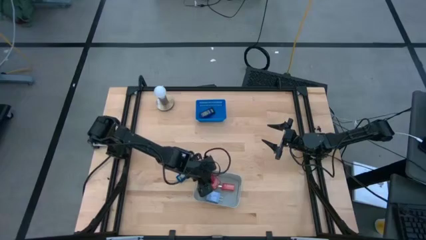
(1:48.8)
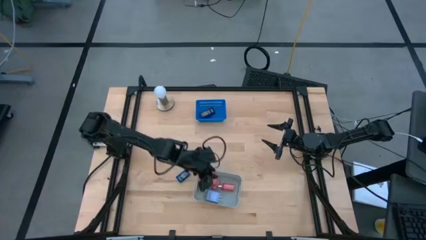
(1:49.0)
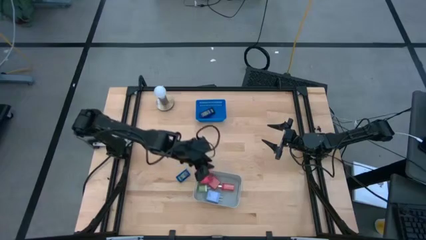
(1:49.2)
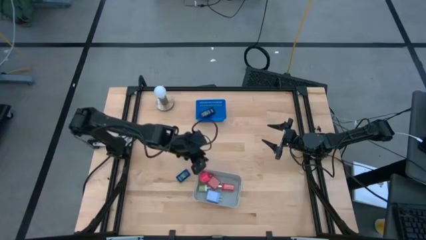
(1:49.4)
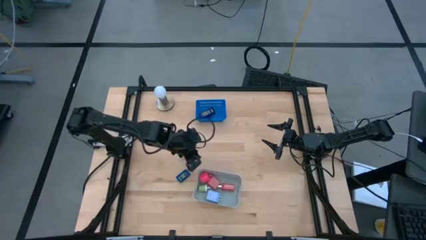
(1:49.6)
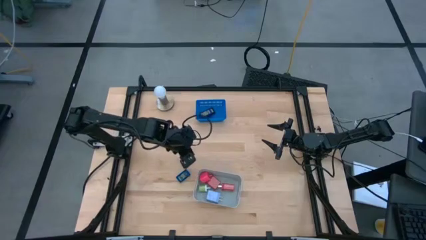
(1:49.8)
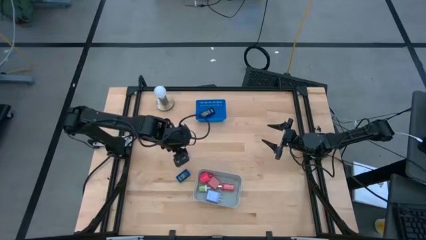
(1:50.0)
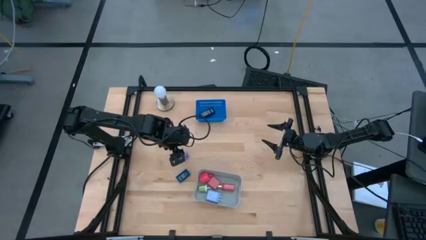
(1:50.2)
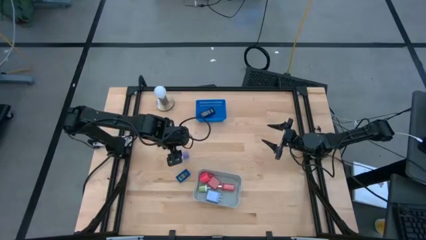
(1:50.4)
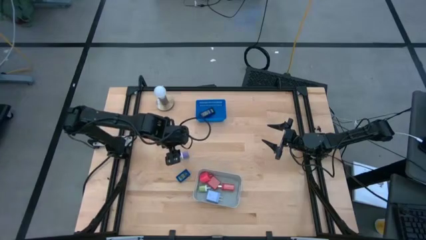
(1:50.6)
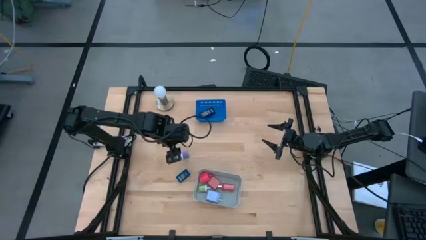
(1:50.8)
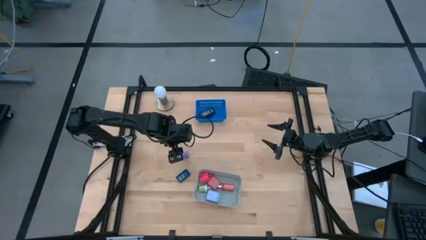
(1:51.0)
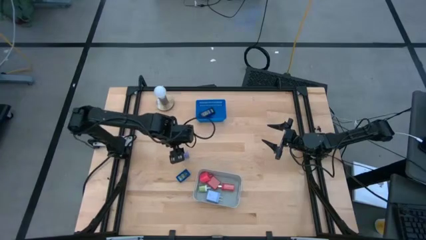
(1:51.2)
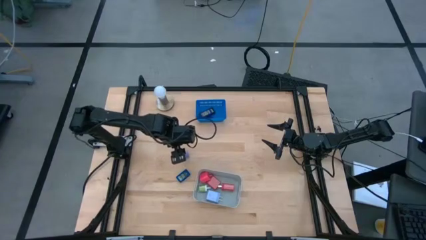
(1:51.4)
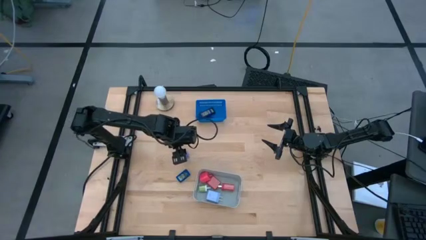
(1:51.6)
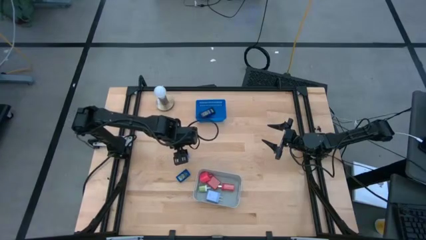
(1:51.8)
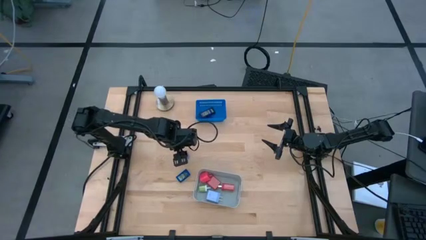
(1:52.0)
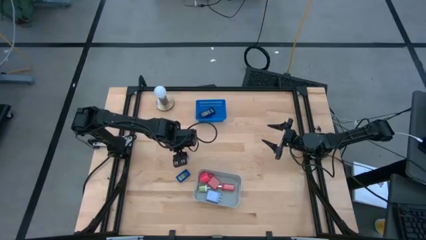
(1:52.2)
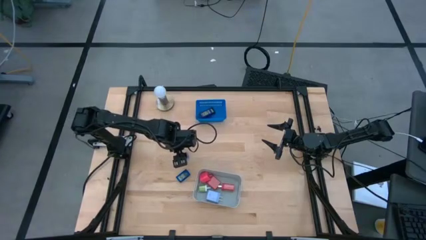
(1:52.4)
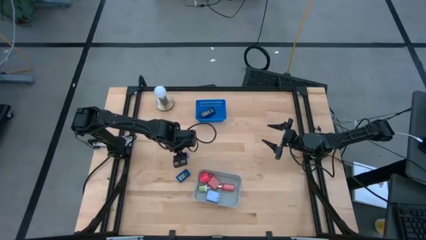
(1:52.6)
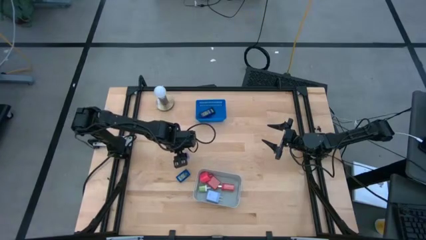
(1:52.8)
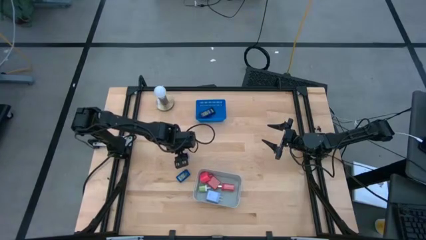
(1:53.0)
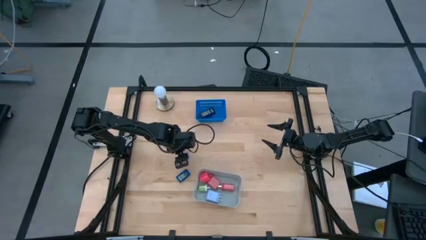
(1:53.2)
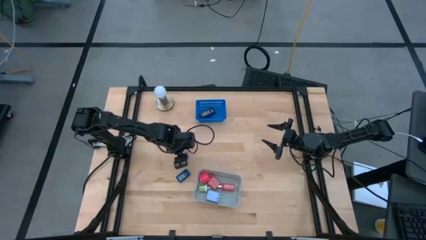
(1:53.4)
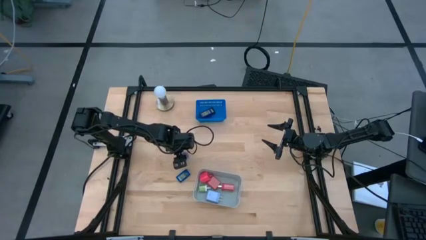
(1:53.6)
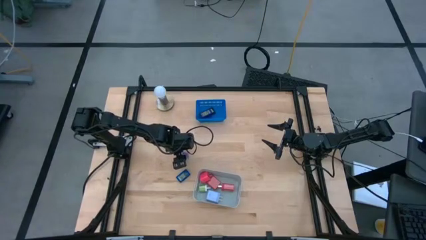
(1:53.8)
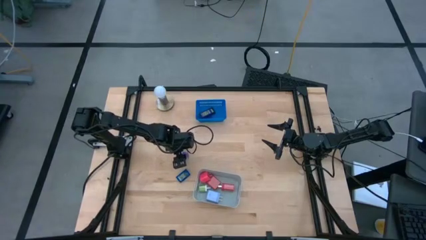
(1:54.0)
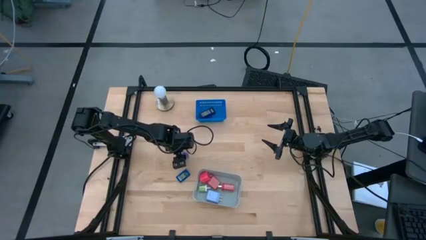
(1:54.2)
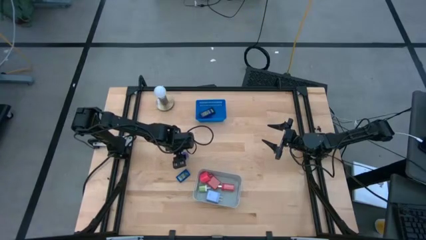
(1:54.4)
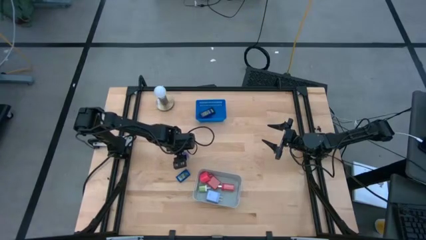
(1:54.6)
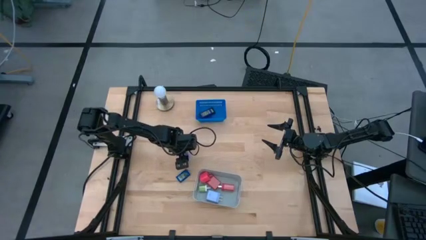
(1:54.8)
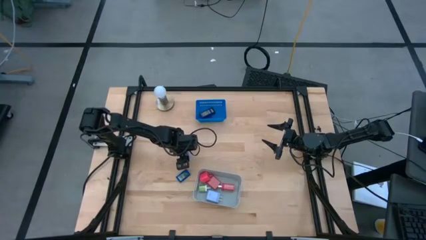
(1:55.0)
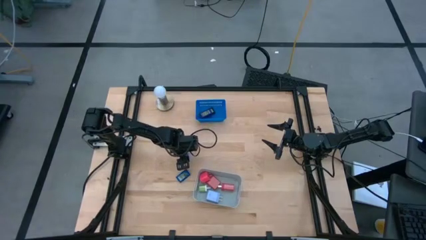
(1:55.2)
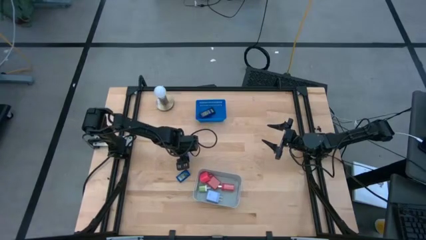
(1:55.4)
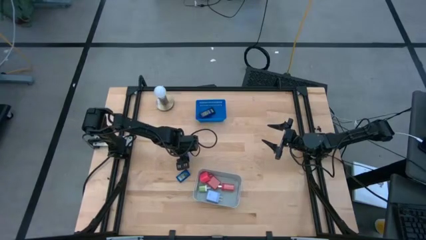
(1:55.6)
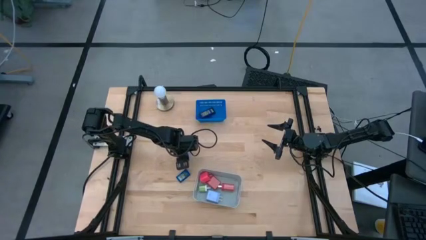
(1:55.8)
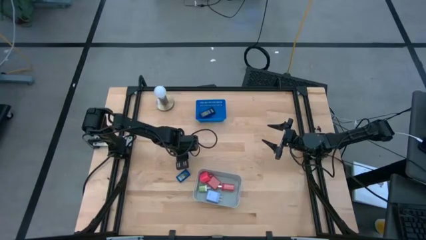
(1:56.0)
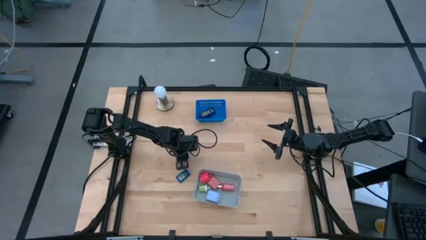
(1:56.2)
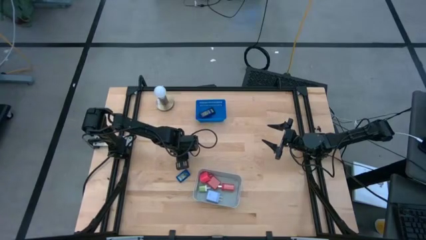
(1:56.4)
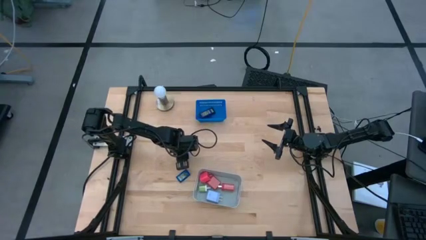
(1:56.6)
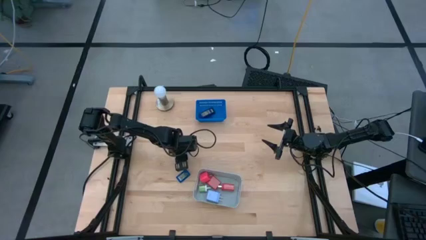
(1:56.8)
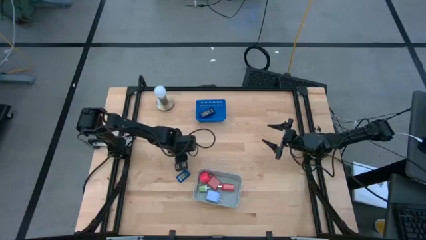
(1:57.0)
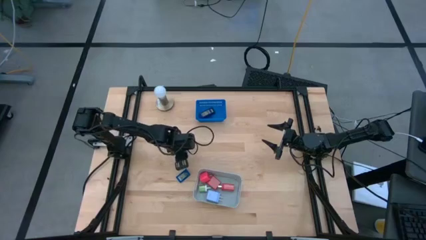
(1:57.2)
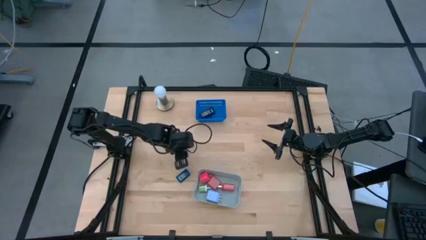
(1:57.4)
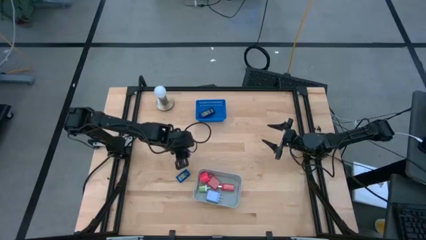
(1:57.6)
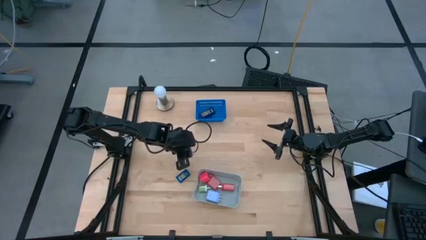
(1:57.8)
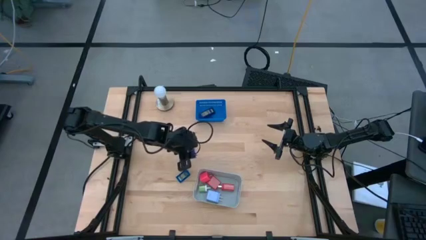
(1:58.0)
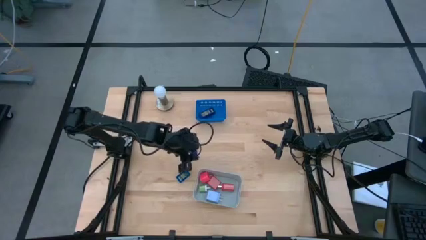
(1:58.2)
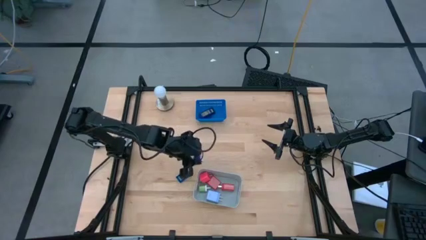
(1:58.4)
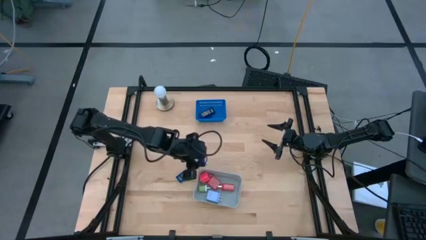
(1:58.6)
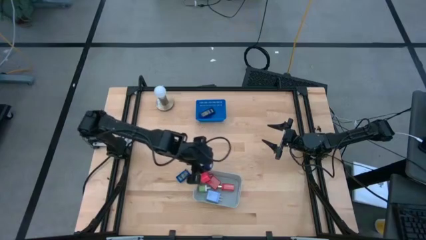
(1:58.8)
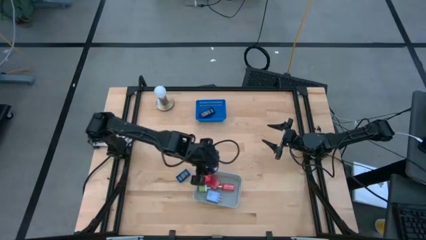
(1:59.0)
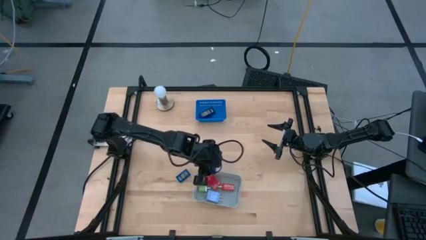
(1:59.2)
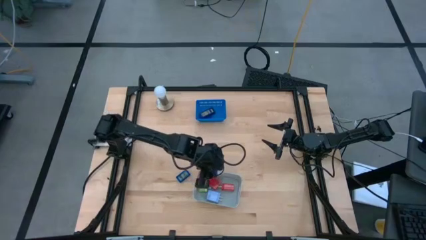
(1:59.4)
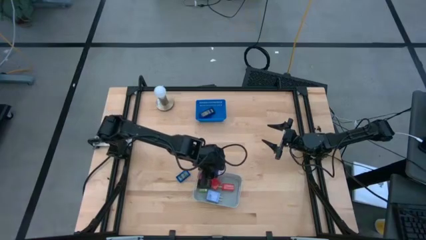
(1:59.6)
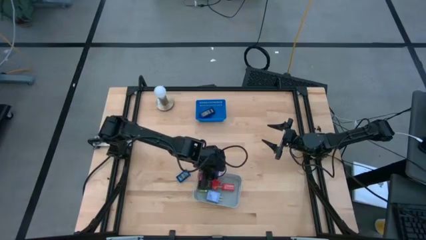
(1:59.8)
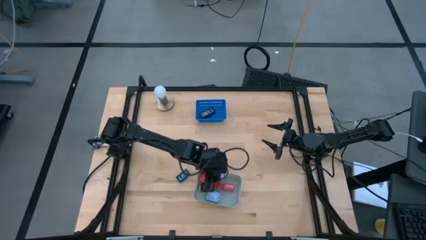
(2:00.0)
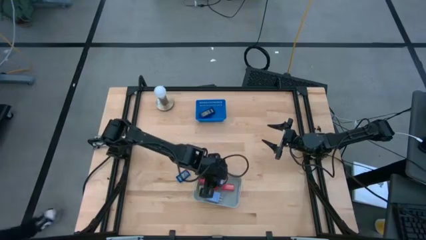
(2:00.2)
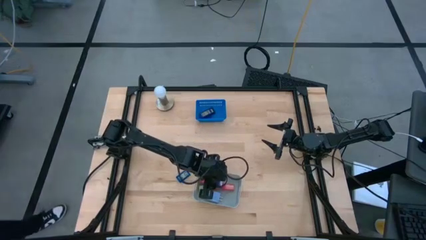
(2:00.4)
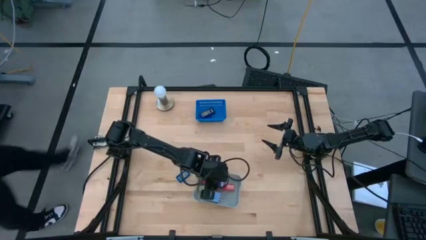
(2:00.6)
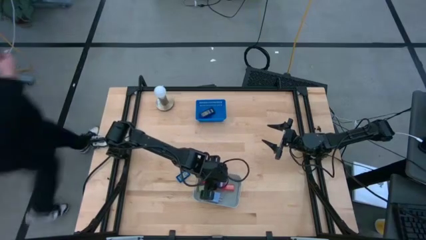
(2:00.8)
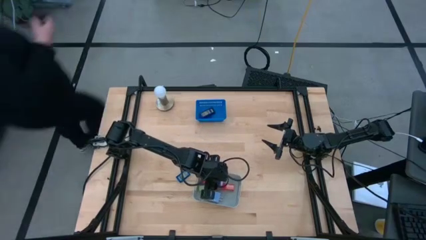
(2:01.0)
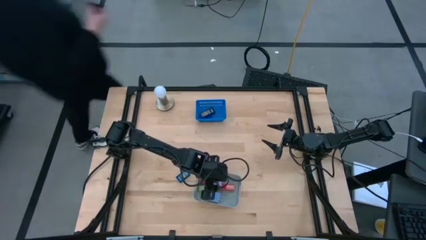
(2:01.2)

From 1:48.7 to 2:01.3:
Task: Pick & Place Office items
Put the violet charger adapter into the gray bin
